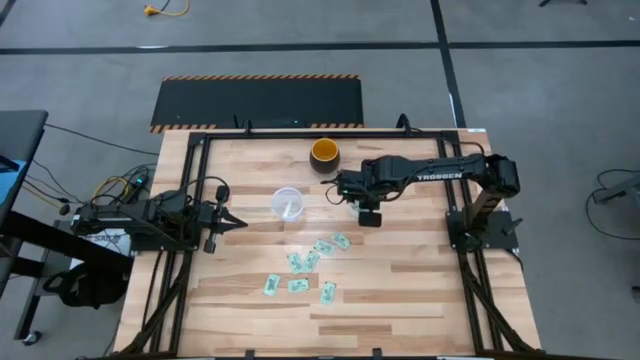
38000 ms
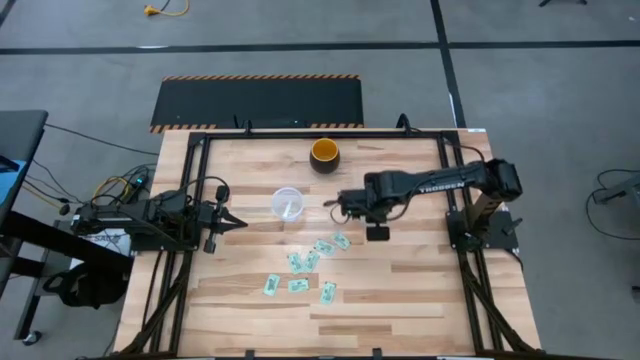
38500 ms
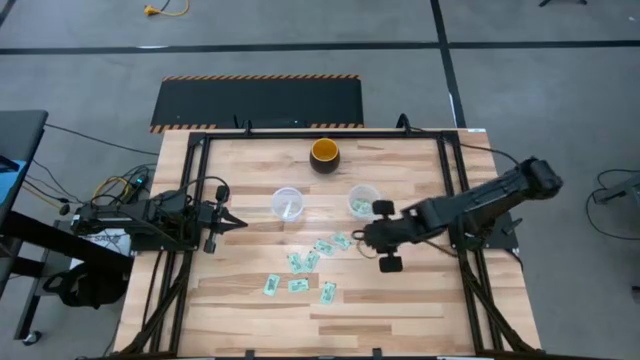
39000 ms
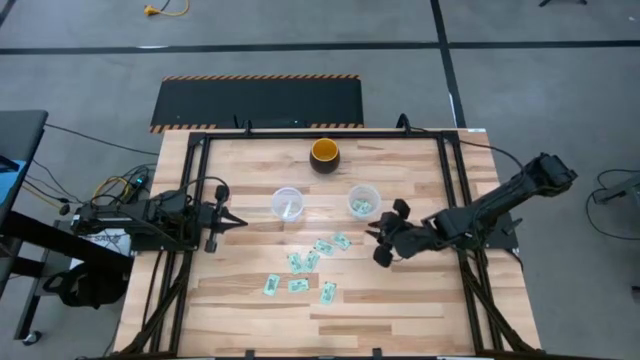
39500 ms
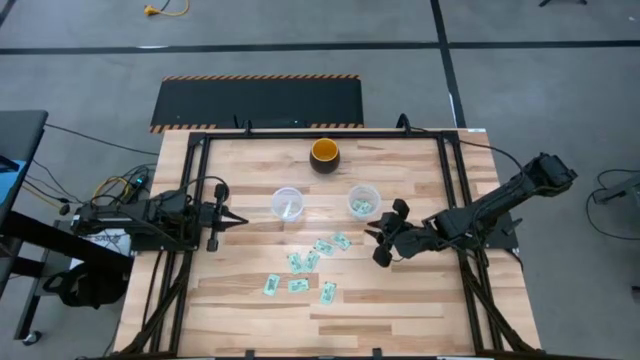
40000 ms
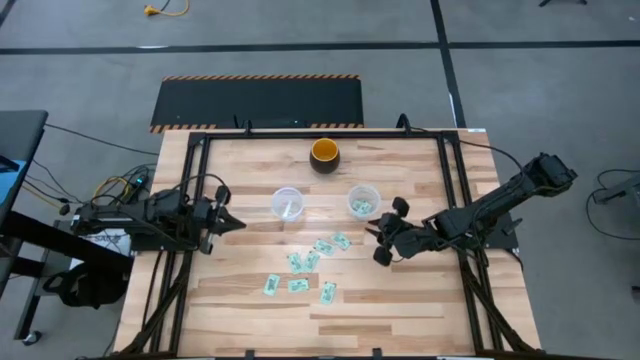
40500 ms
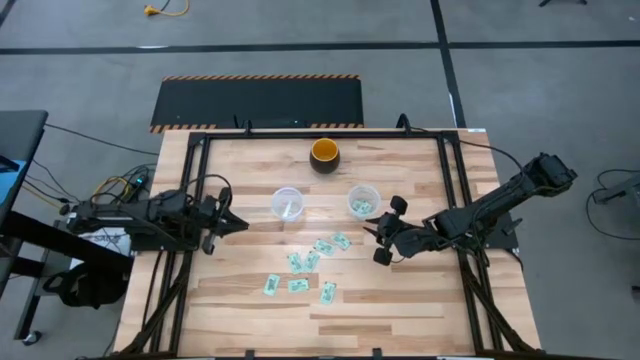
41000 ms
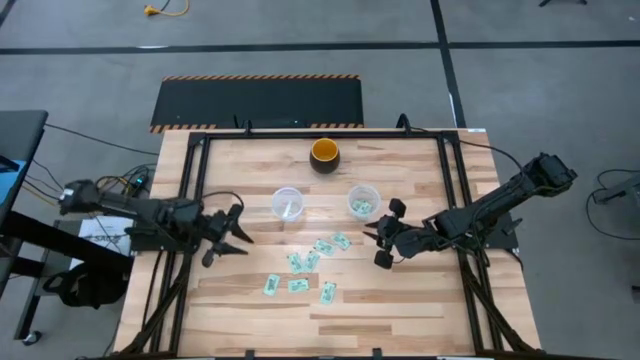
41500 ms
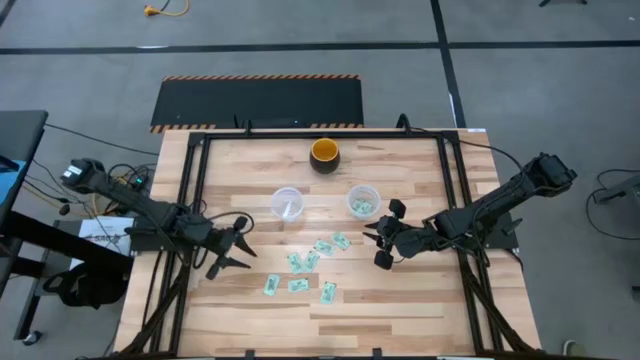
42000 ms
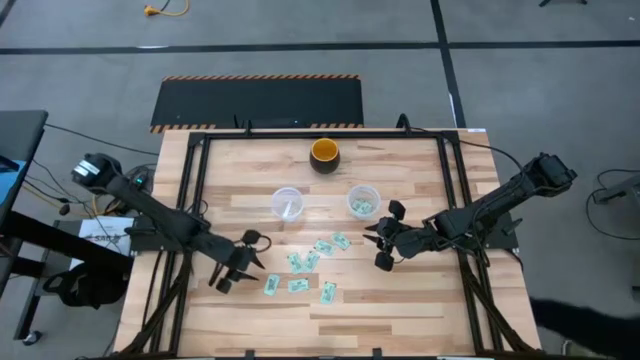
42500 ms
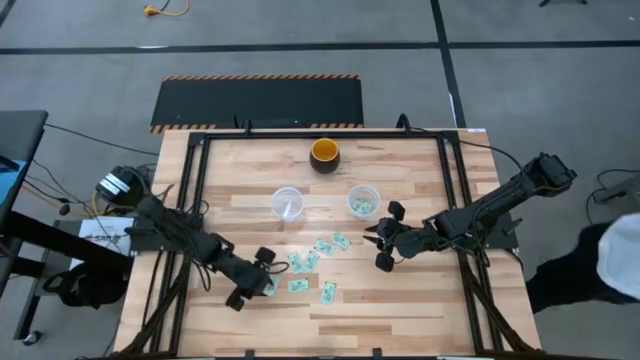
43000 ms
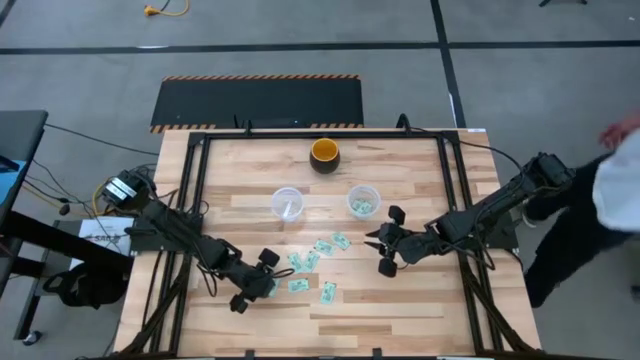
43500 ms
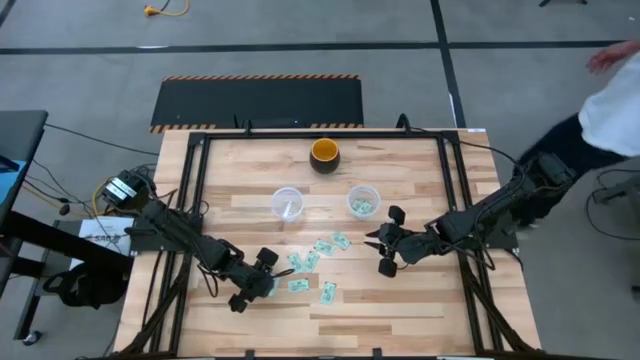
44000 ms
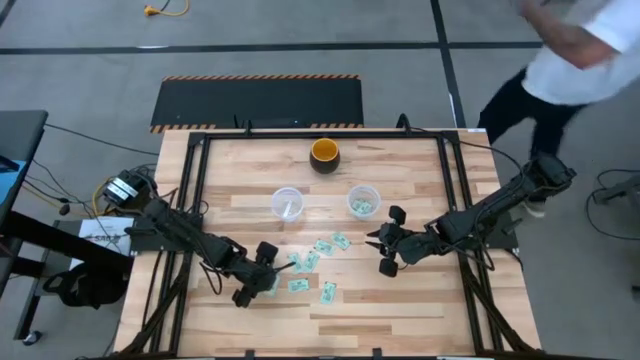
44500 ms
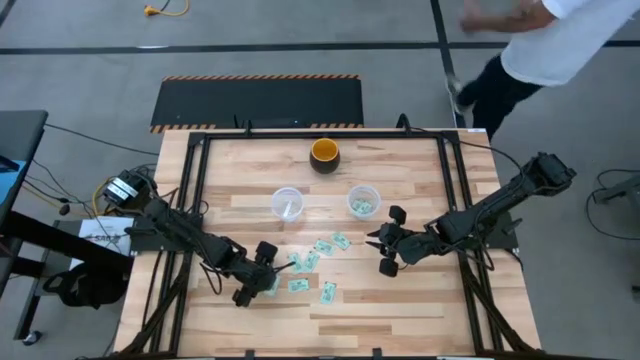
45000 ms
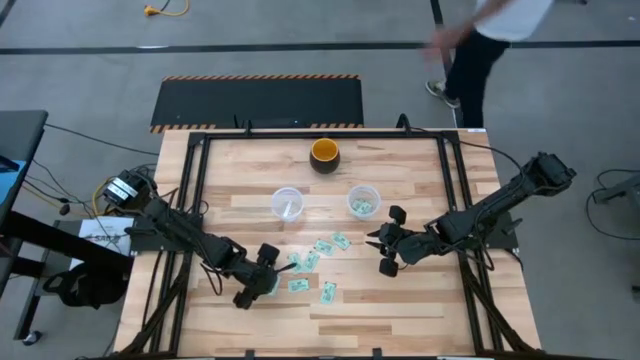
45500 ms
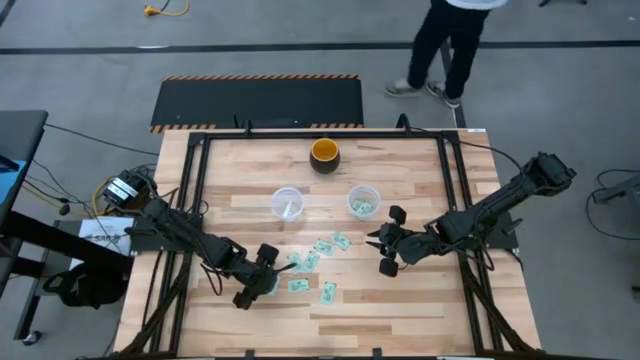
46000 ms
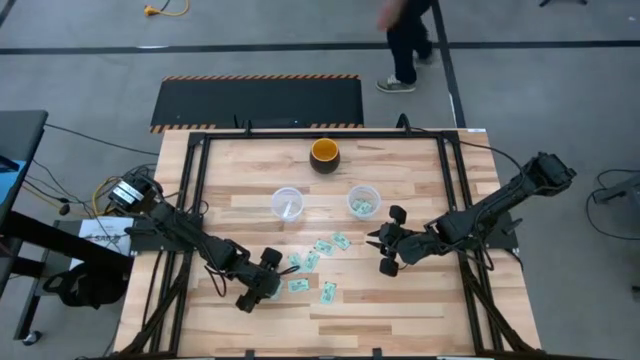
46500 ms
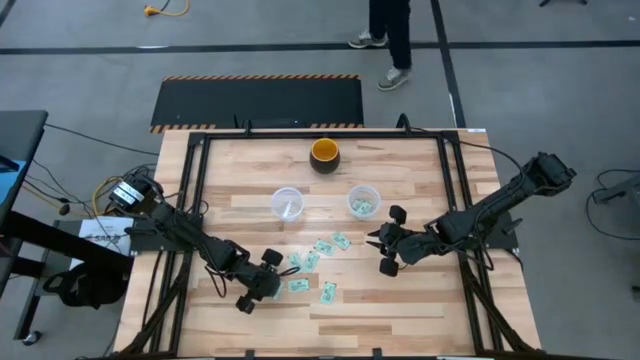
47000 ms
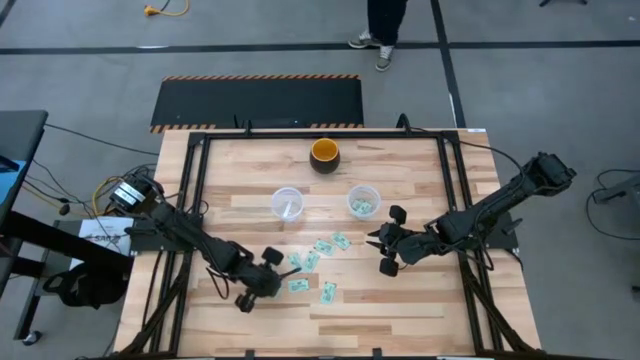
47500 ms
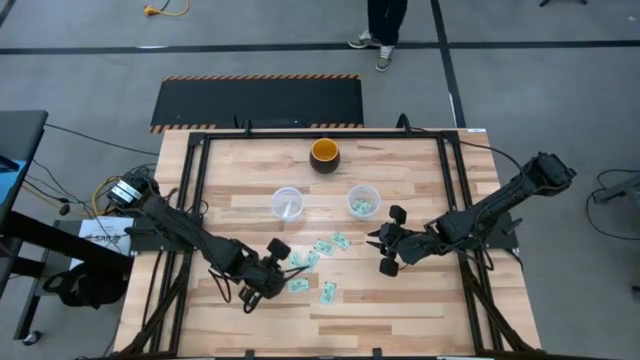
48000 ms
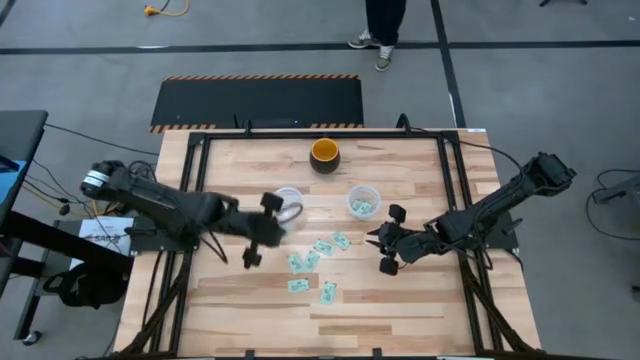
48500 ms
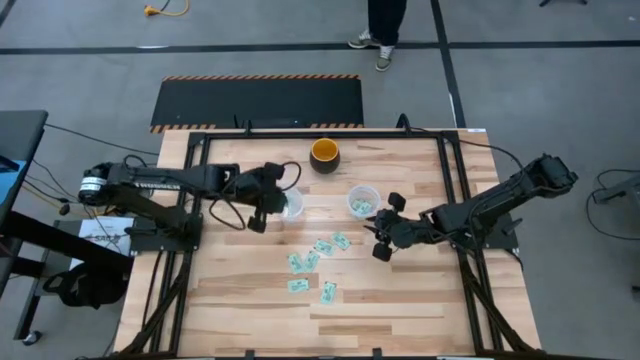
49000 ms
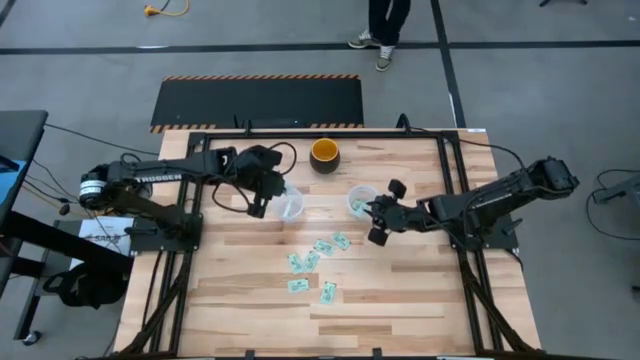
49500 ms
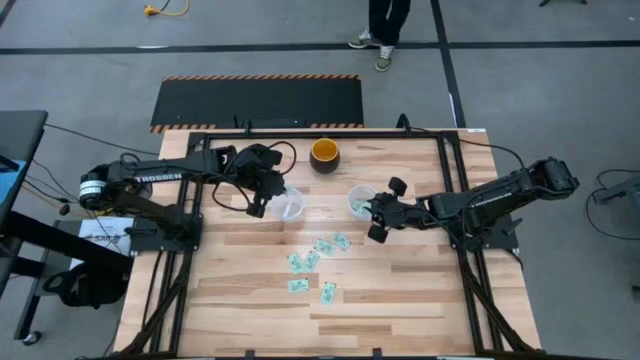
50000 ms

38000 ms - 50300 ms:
Task: Pick and place Stevia / Truvia into bins
Put the stevia packet into the left transparent container

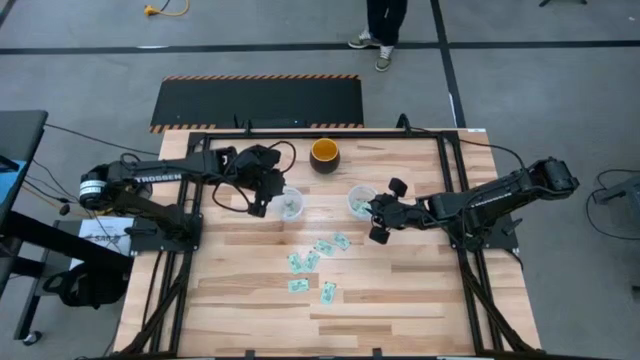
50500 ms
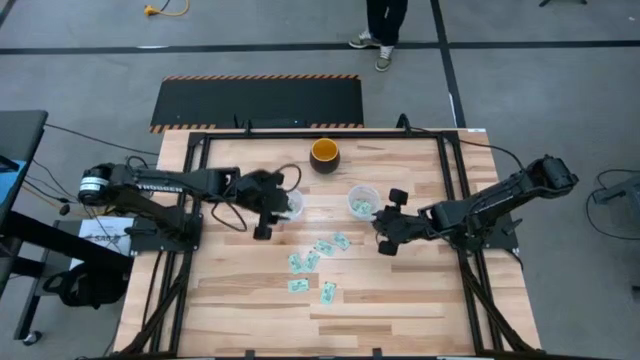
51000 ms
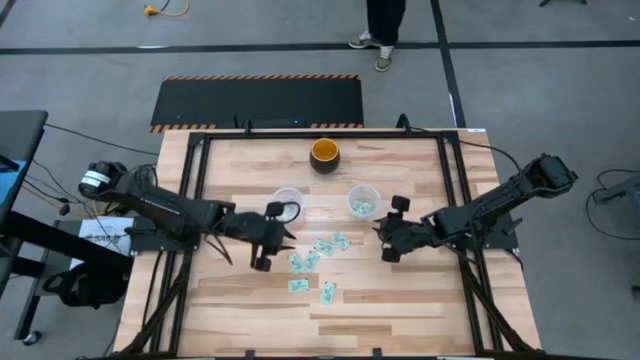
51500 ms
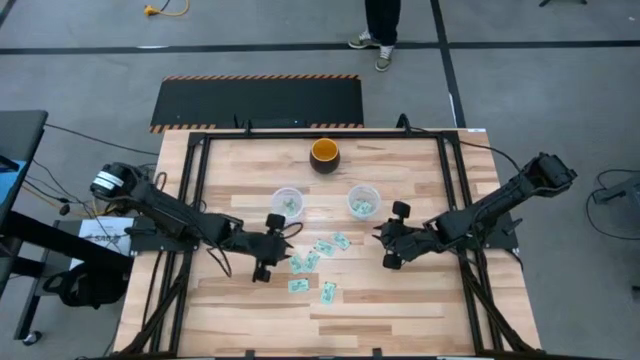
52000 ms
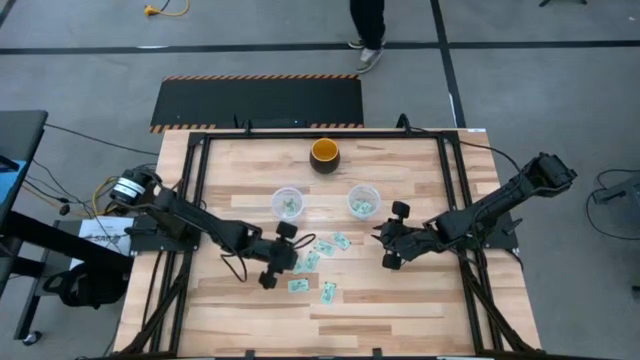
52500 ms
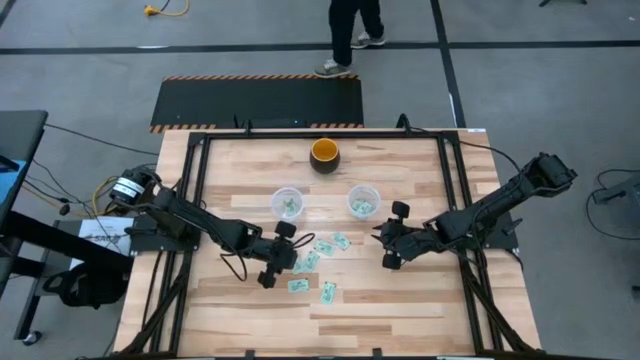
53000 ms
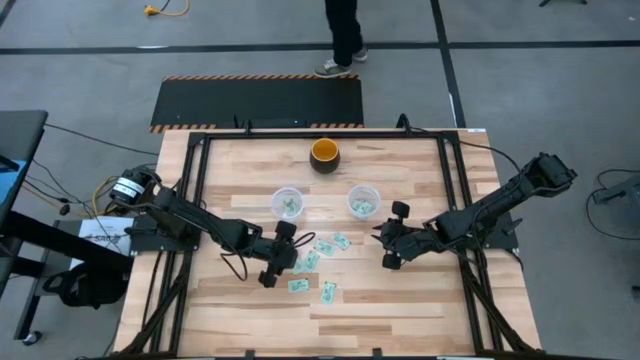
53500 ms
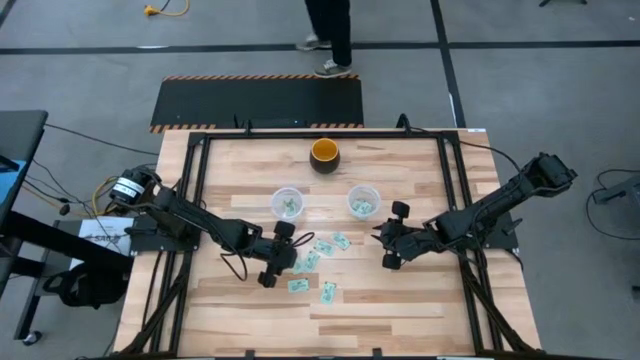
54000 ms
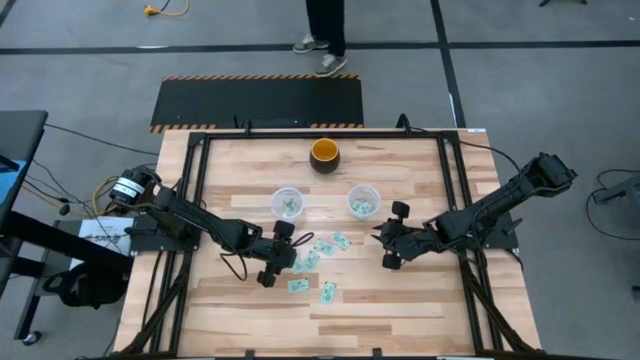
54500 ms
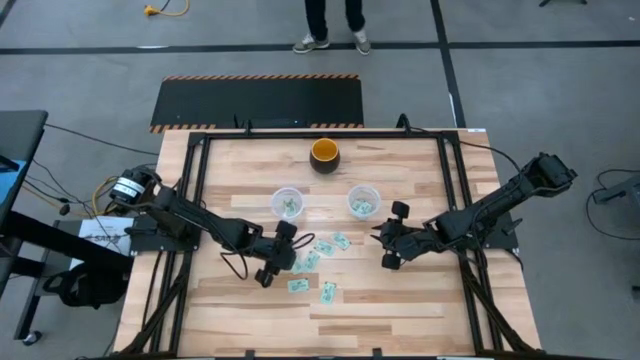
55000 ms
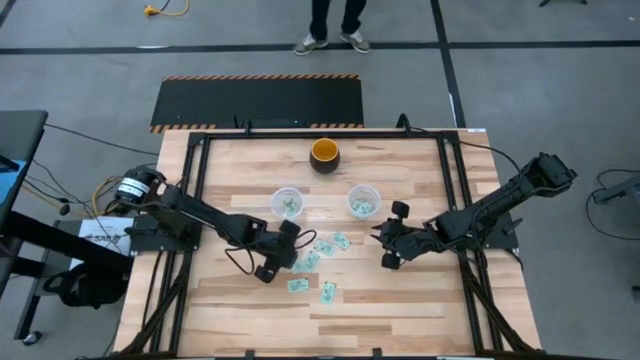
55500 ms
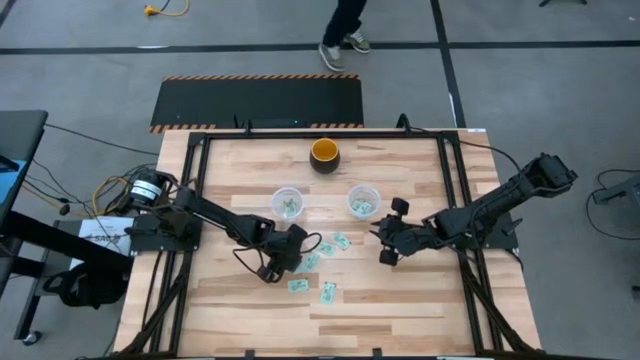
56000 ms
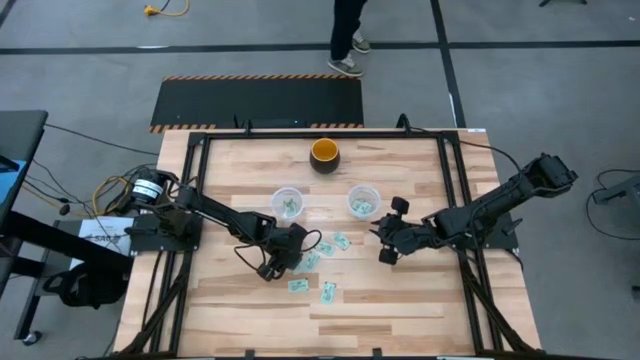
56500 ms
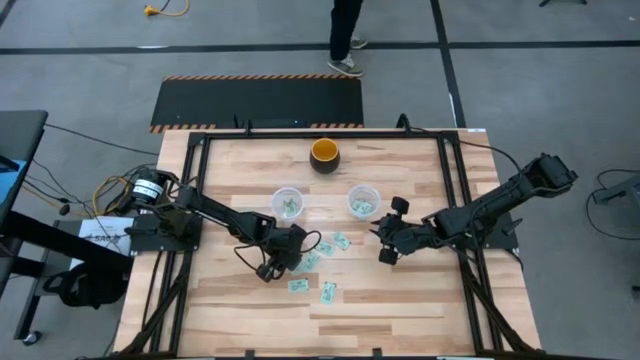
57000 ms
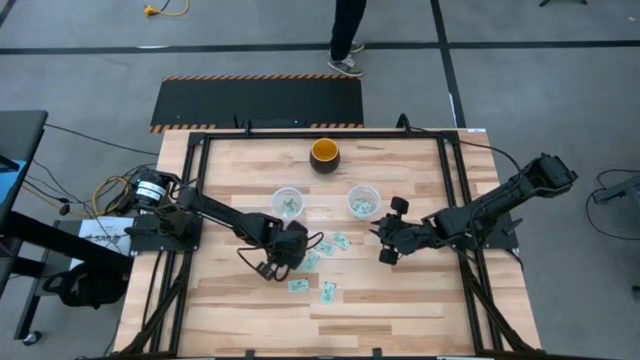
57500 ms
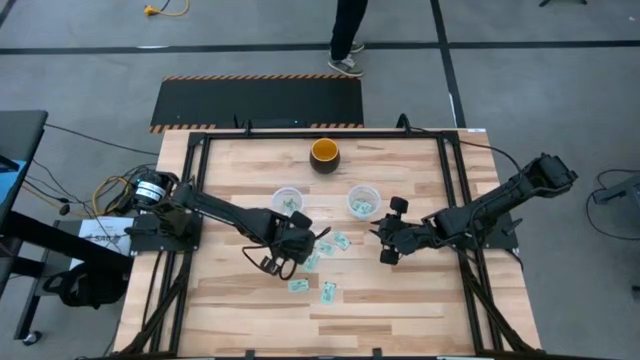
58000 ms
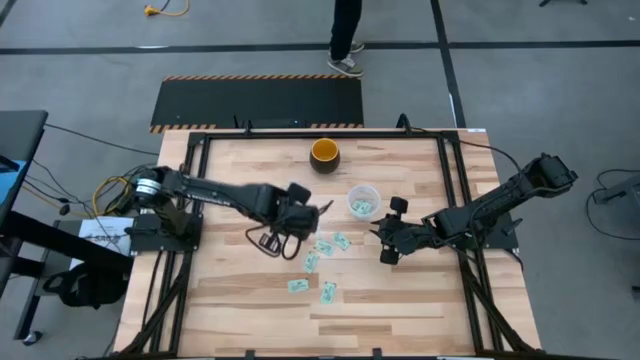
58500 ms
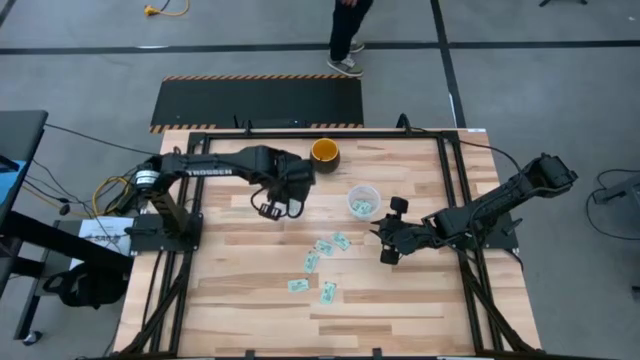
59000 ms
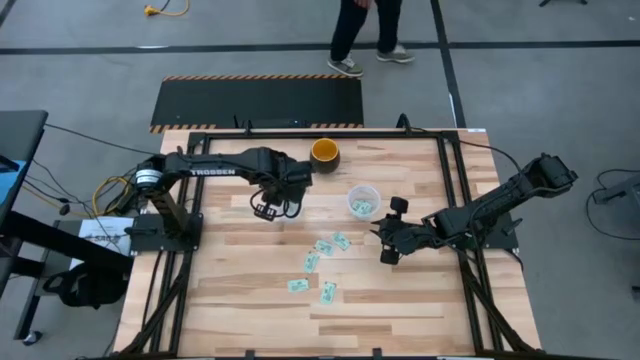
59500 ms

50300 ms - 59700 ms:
Put the stevia packet into the left transparent container
